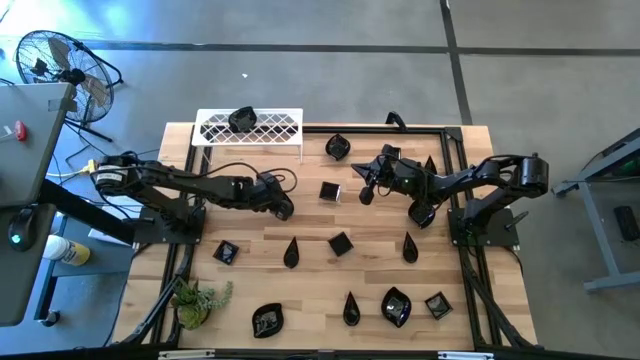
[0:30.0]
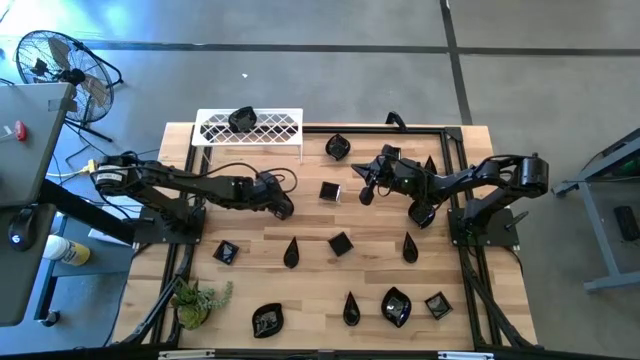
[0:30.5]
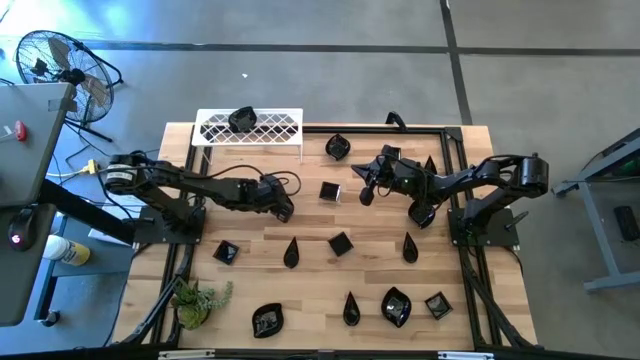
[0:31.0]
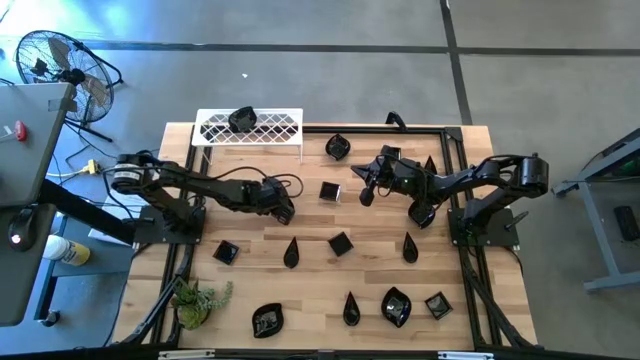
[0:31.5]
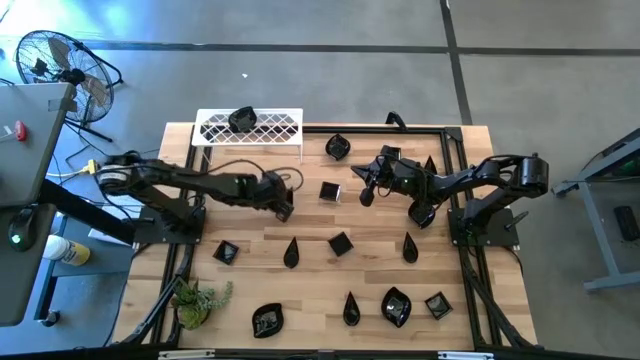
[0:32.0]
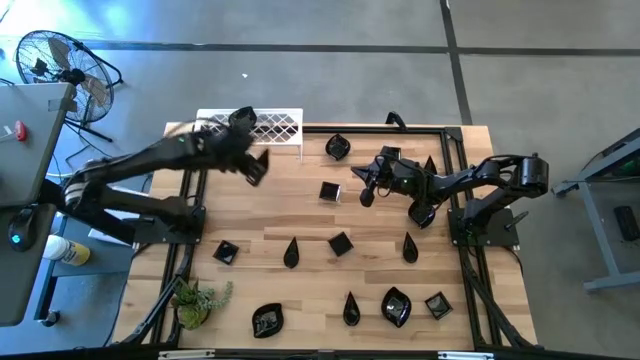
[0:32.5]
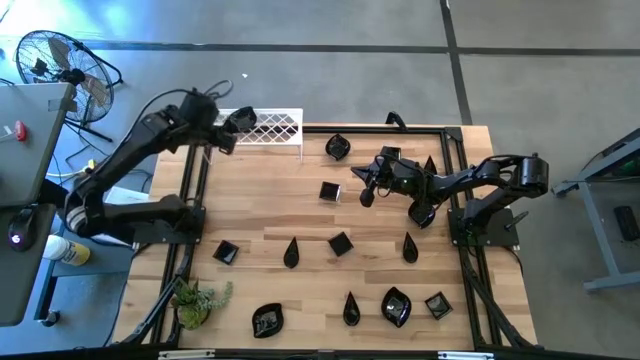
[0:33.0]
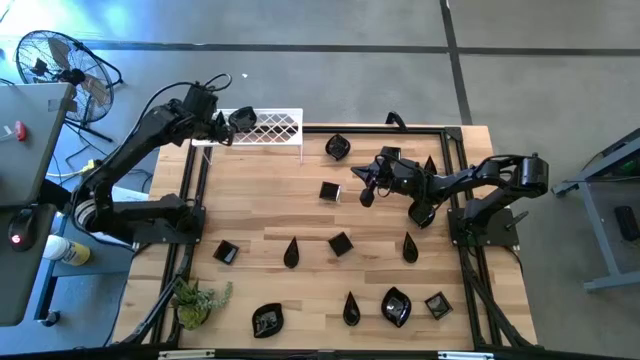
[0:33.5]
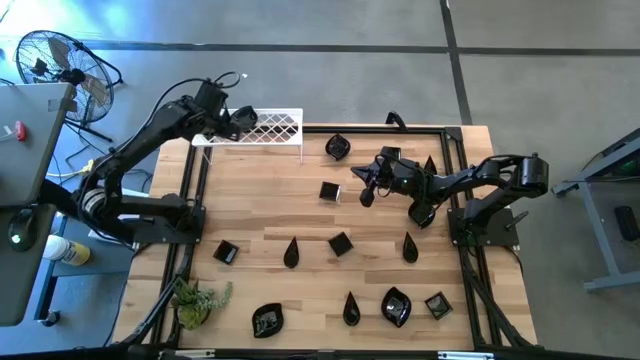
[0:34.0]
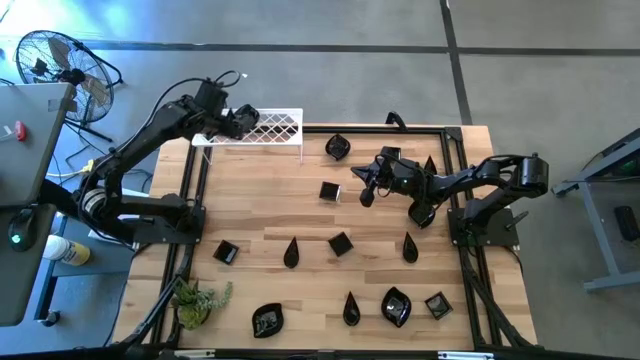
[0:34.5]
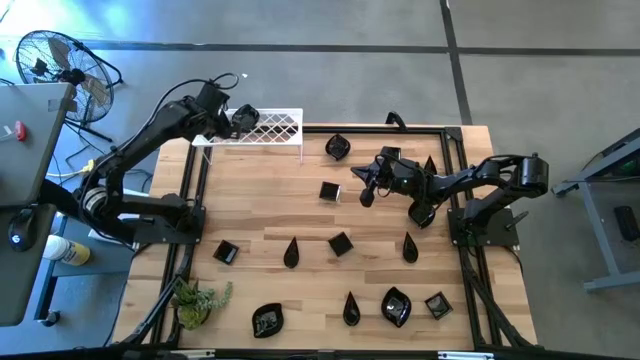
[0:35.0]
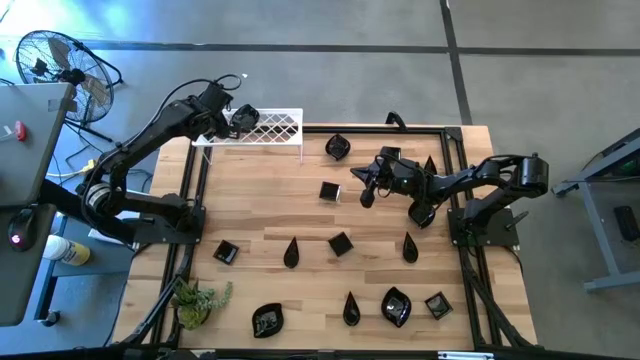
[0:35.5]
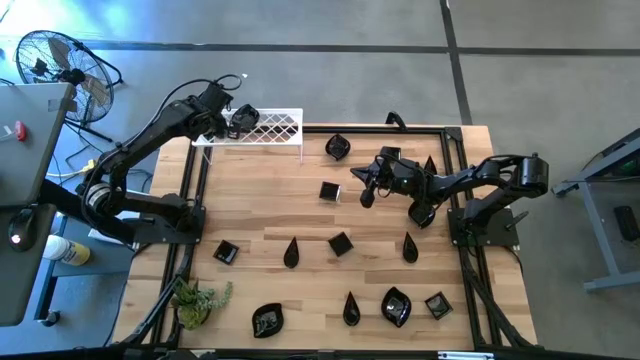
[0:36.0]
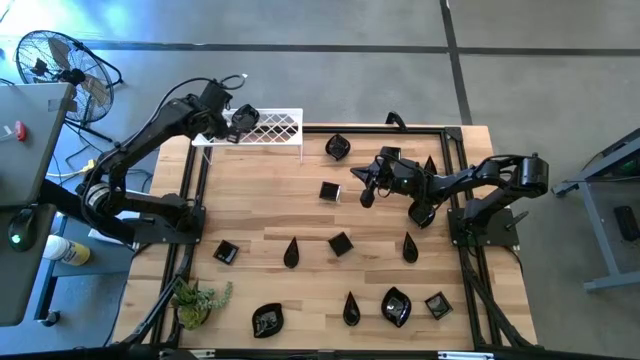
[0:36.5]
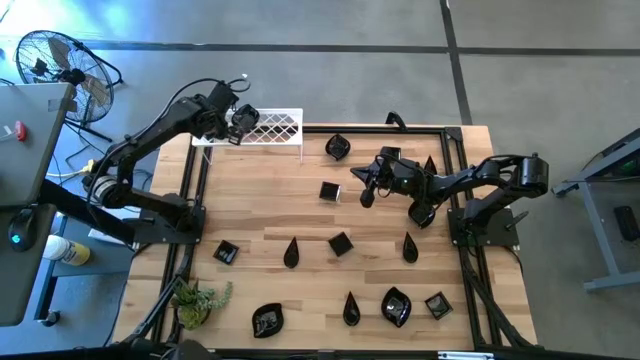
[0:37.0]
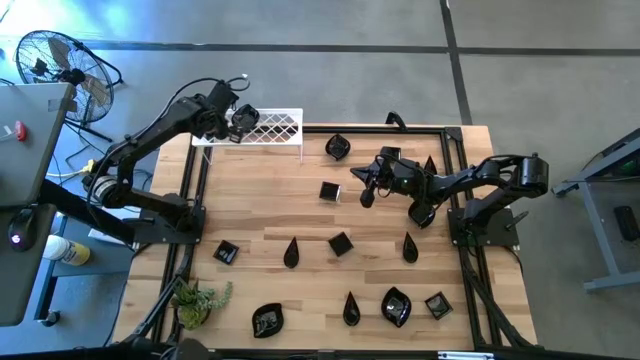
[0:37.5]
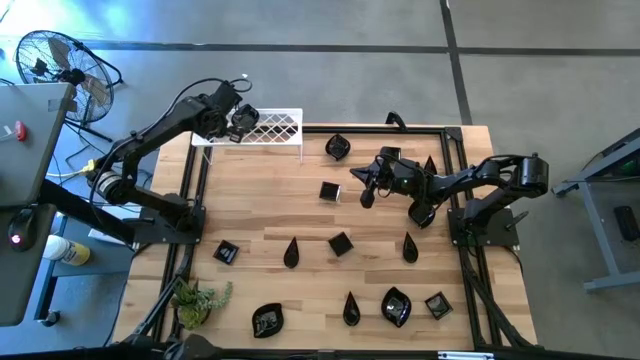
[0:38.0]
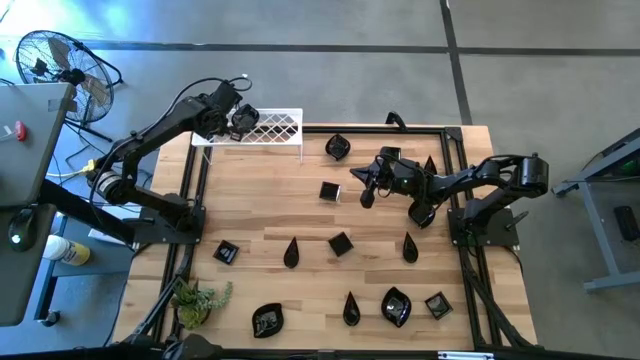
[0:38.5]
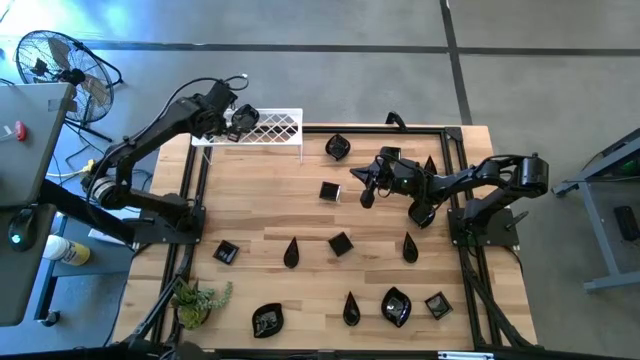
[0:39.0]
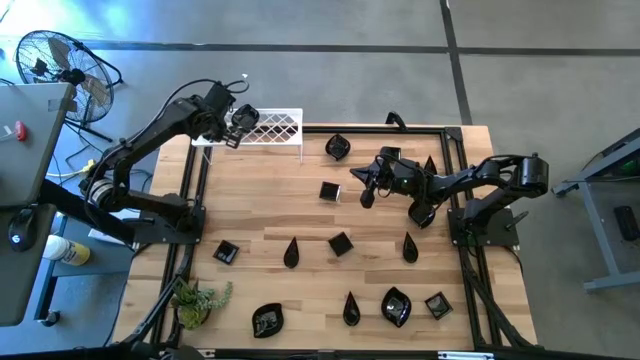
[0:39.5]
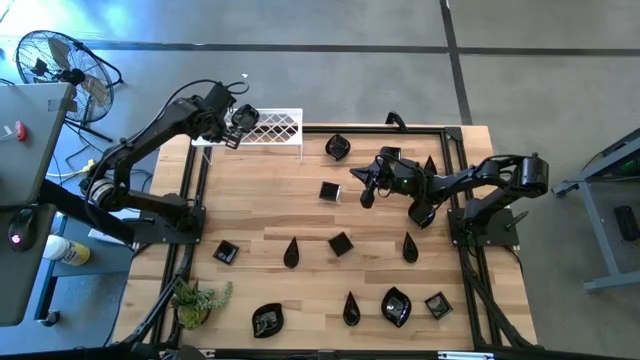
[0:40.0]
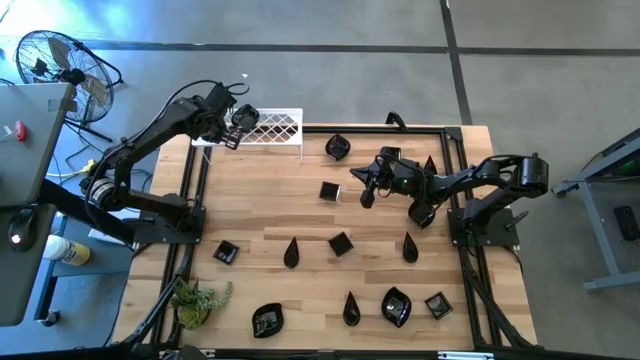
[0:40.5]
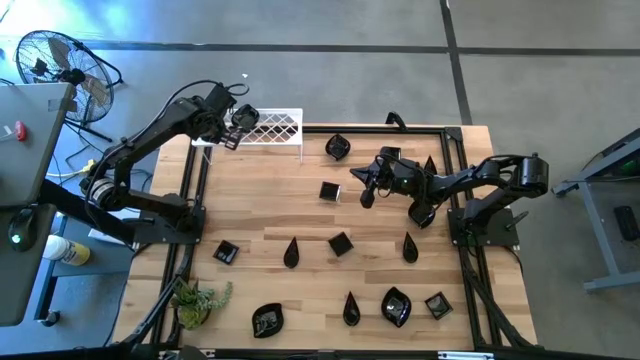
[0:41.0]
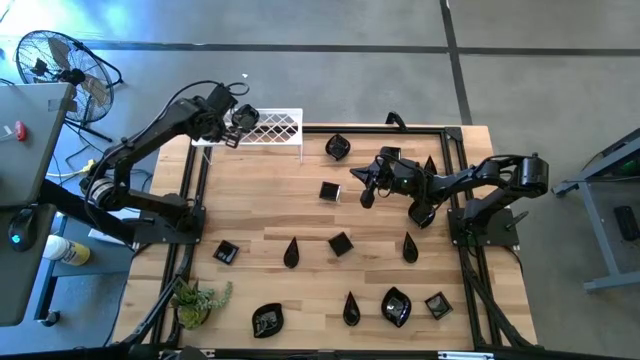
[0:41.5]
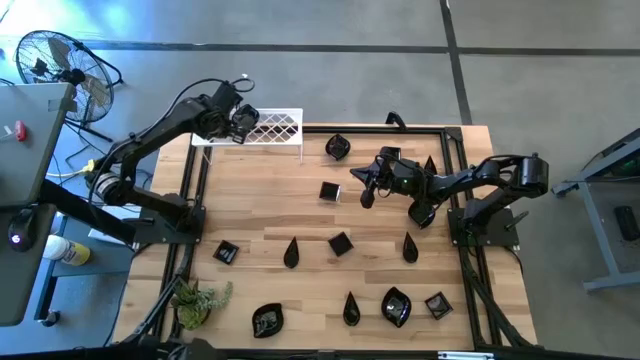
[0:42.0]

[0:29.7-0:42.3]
Task: Pick & Place Mini shaped plates
Put the drop-shaped plate on the shelf

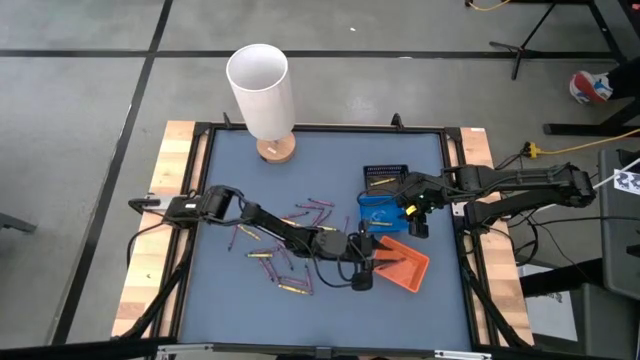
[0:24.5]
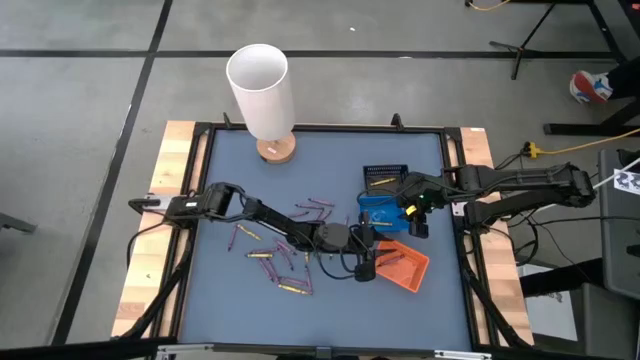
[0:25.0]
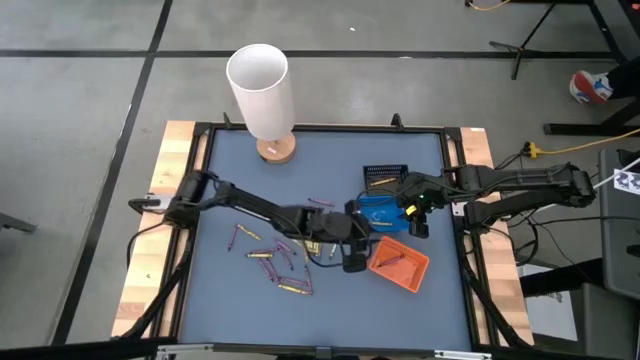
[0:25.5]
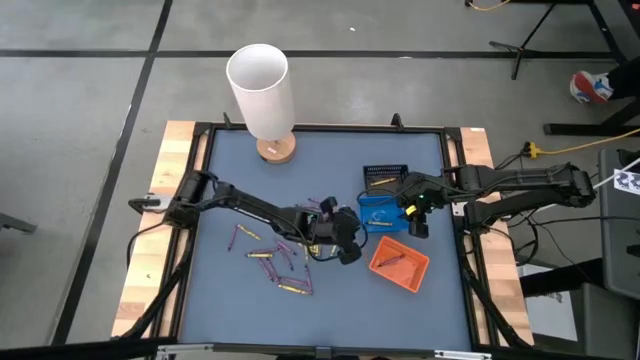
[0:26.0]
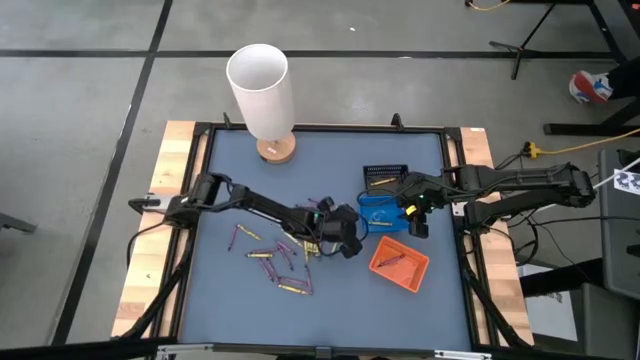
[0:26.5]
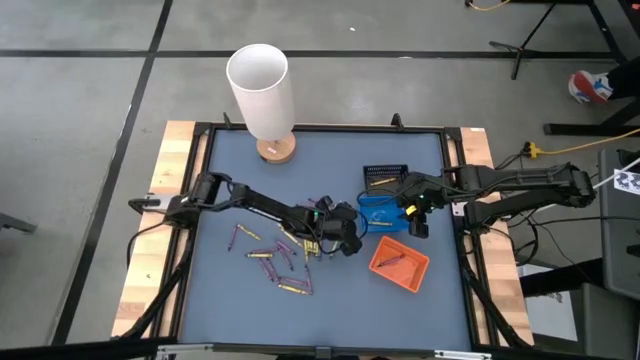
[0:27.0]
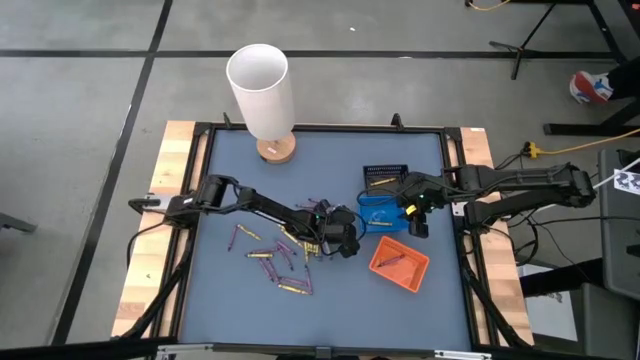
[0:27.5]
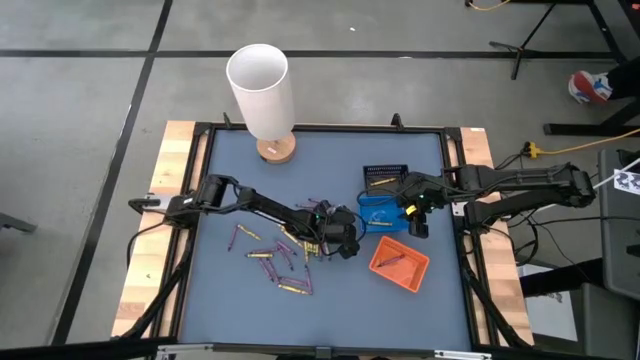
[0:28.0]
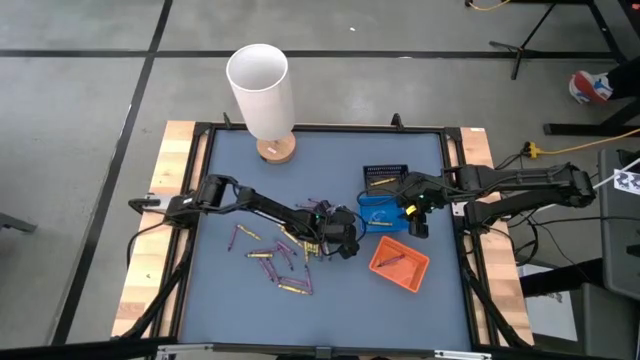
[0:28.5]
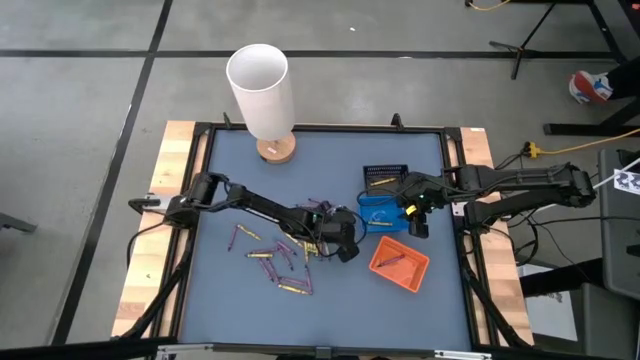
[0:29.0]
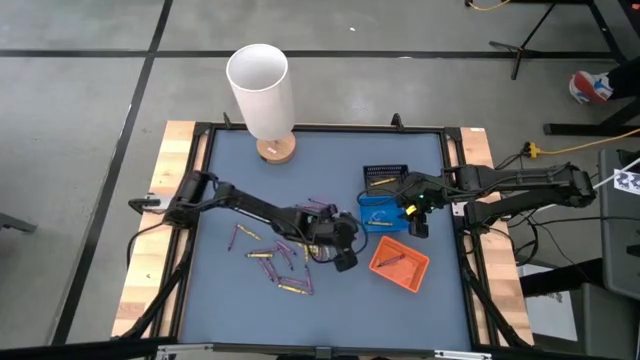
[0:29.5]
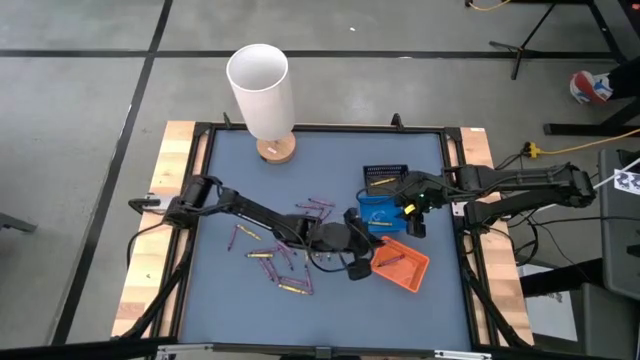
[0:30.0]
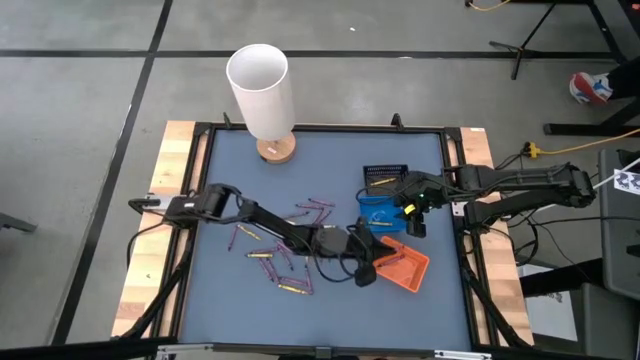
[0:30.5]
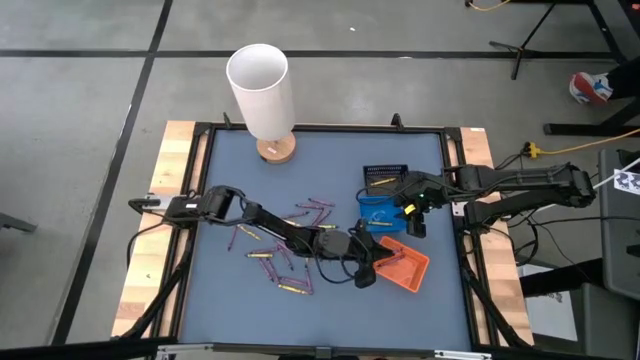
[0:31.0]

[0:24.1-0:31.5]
Task: Sort crayons
Put the purple crayon into the orange bin
